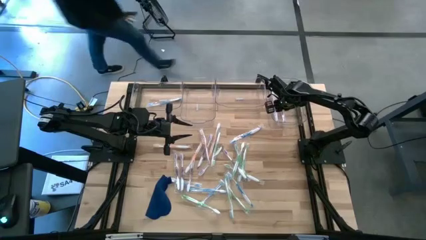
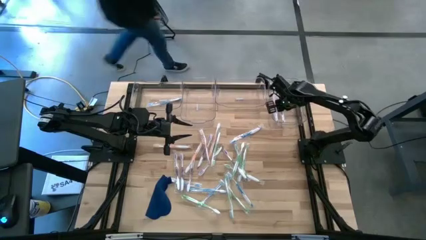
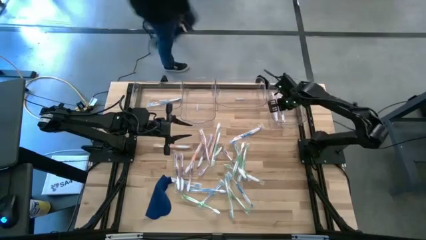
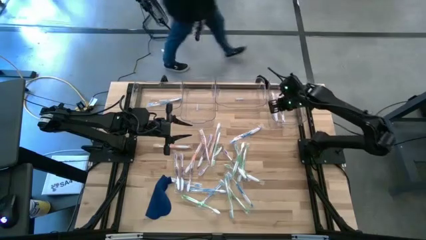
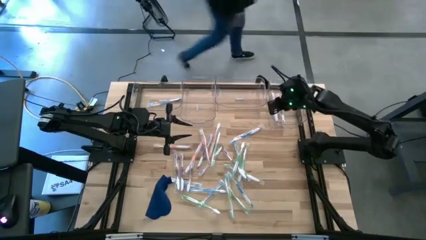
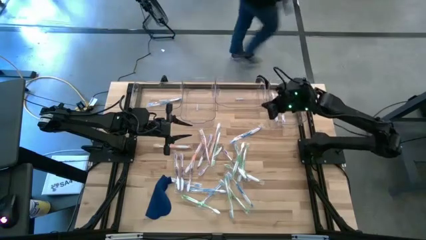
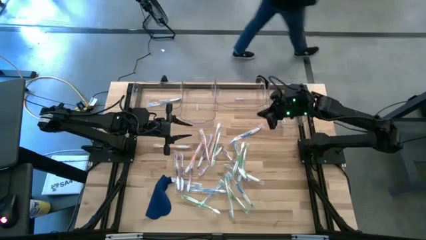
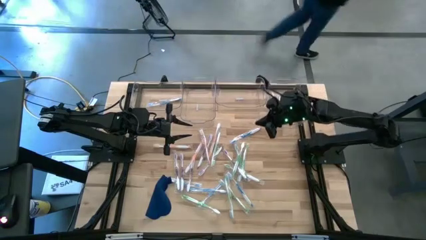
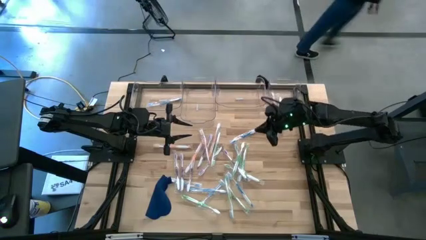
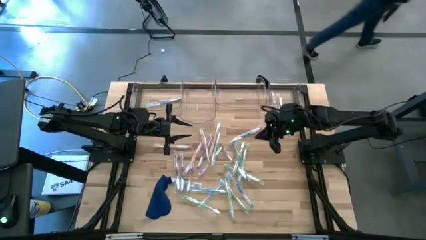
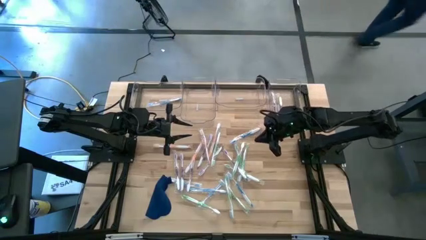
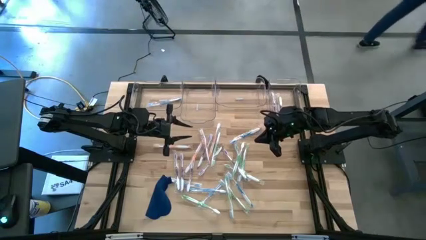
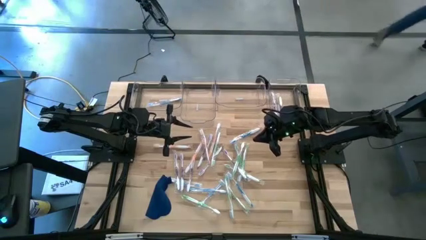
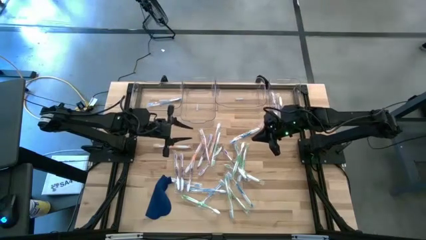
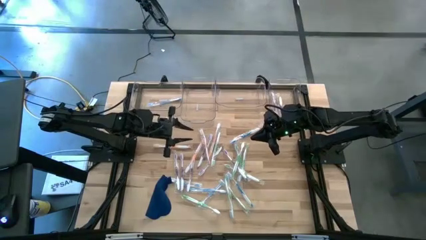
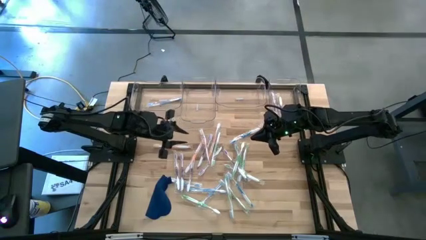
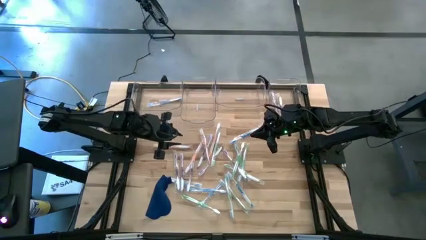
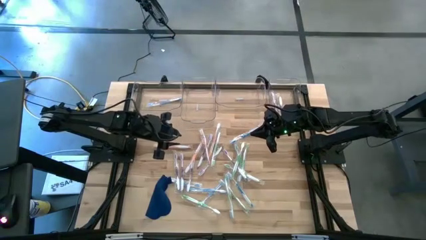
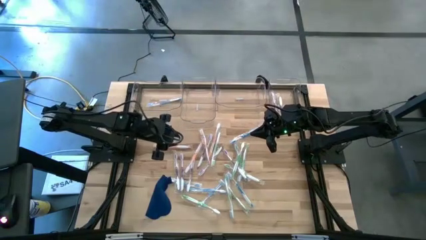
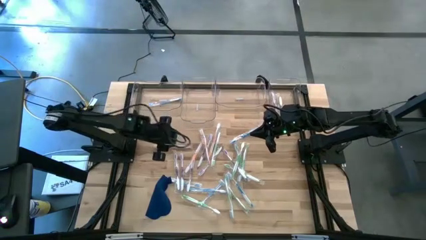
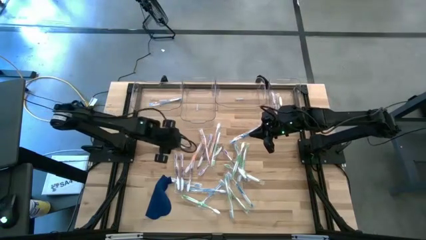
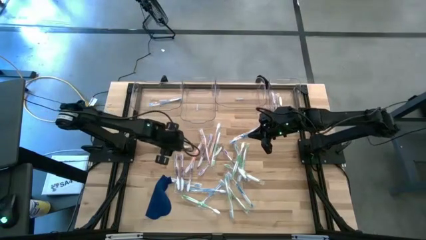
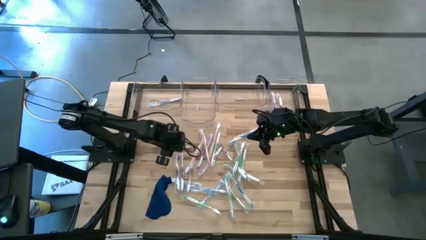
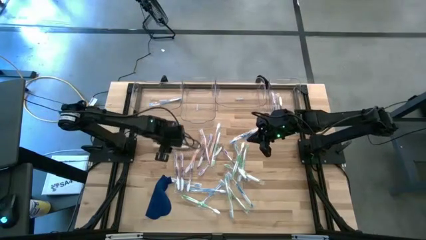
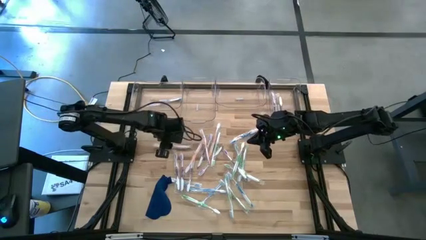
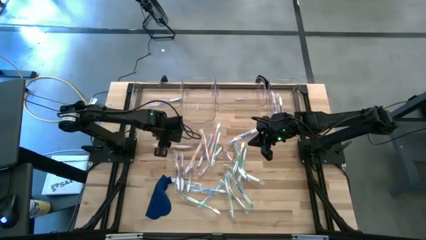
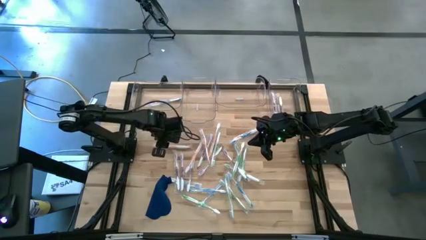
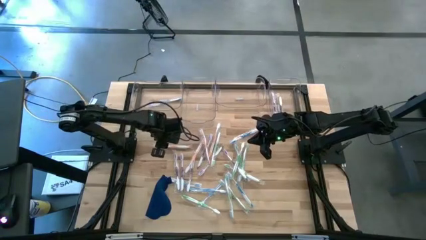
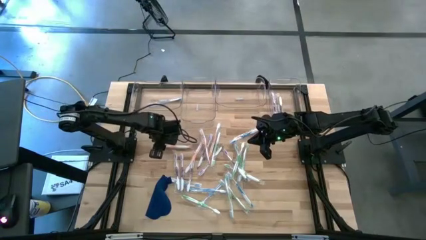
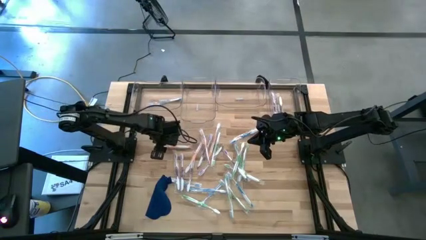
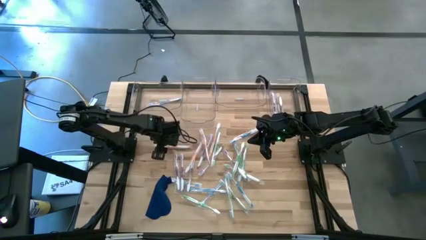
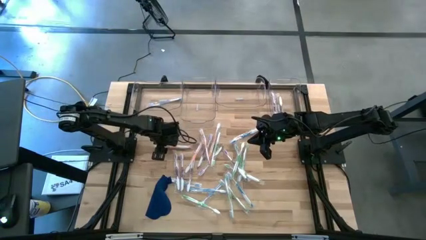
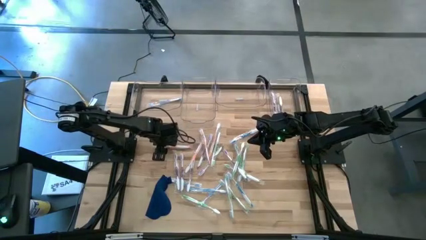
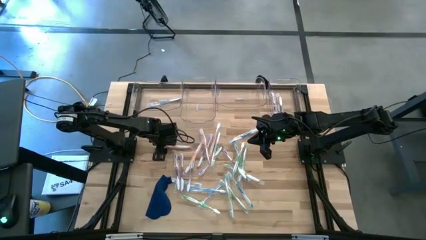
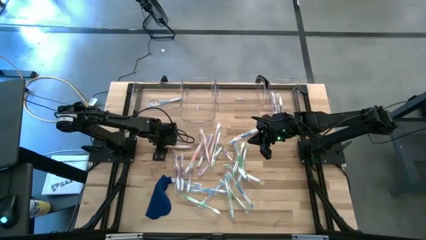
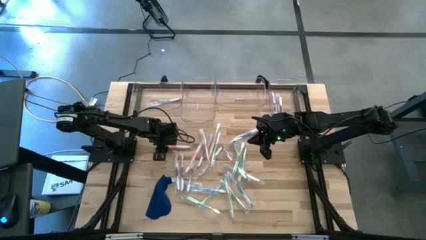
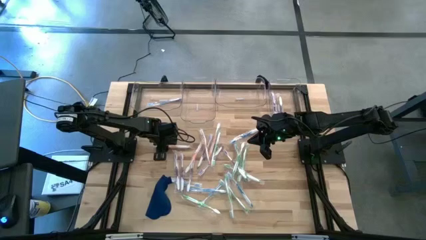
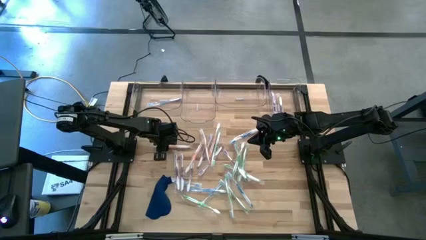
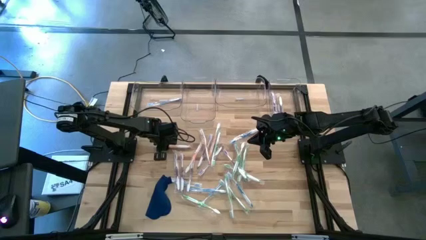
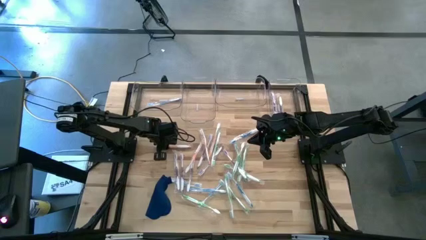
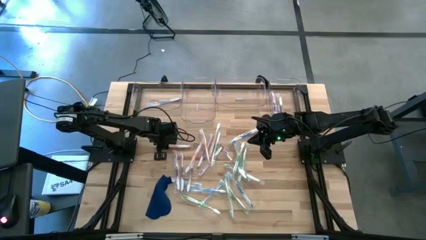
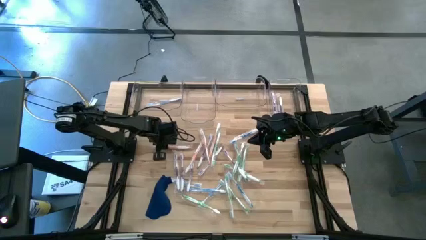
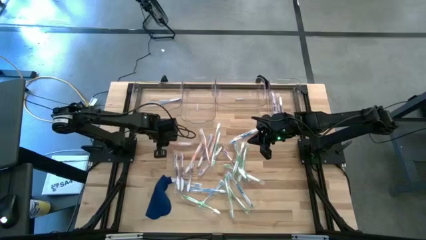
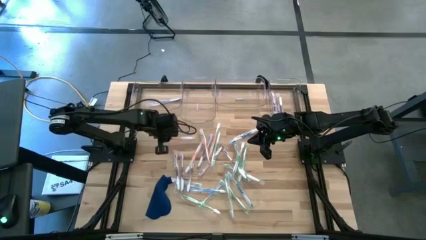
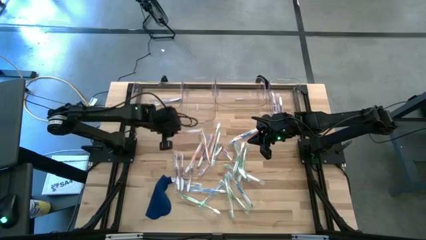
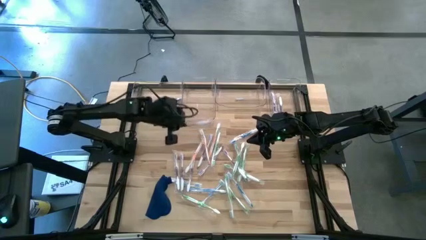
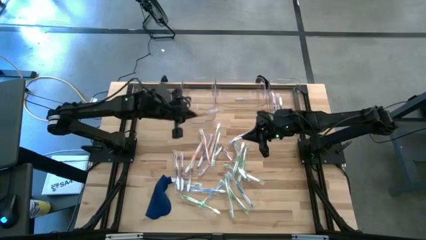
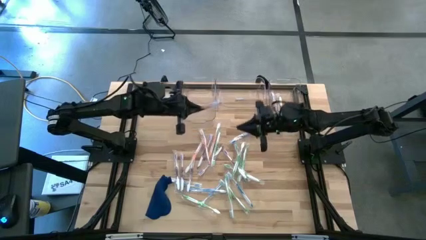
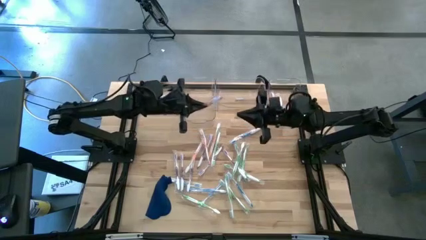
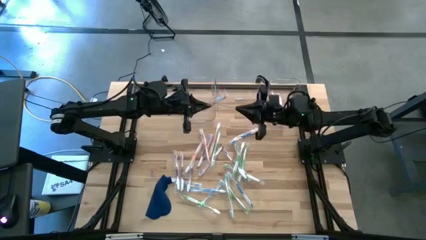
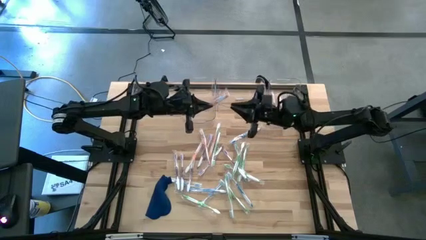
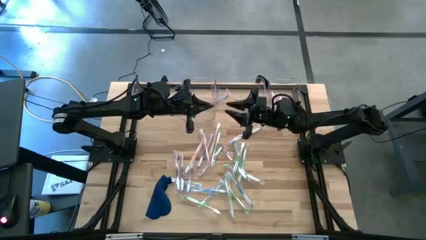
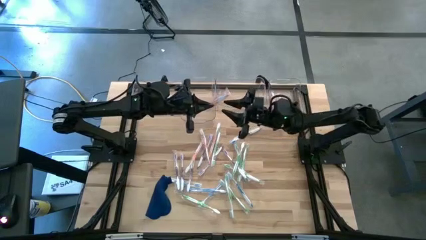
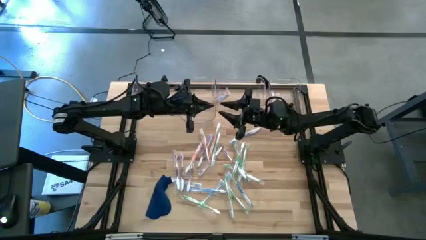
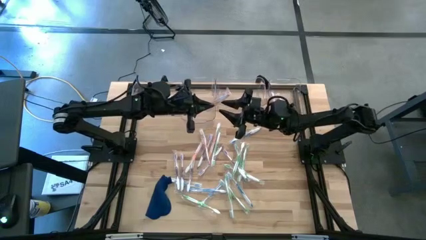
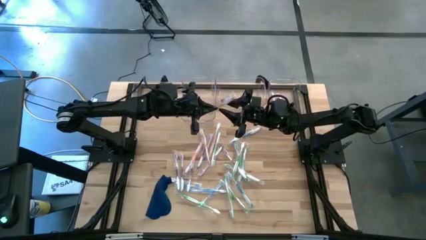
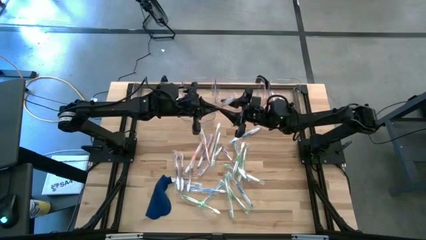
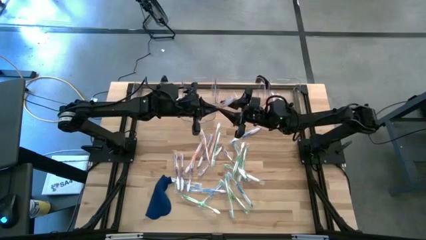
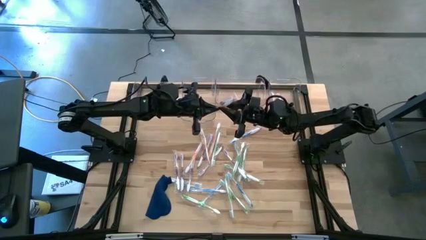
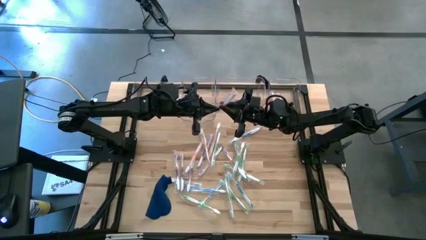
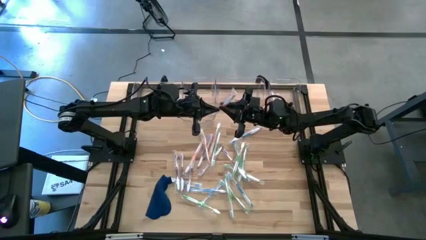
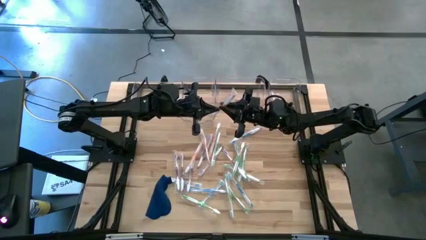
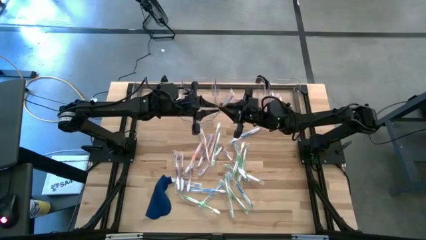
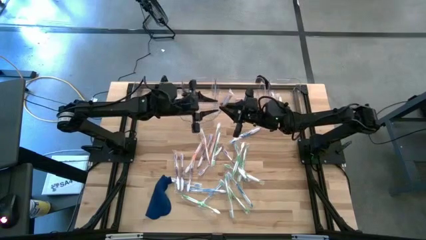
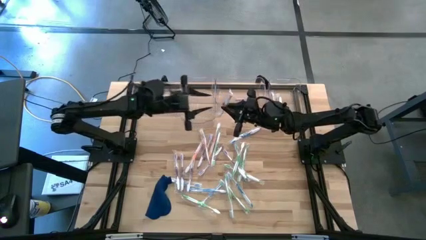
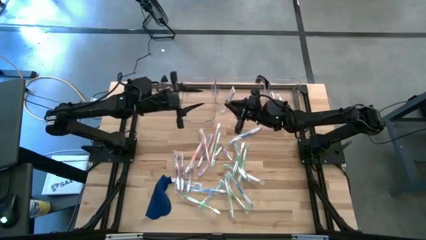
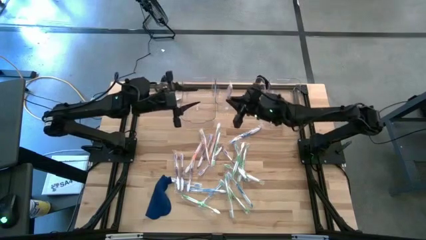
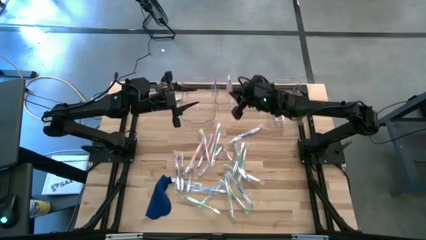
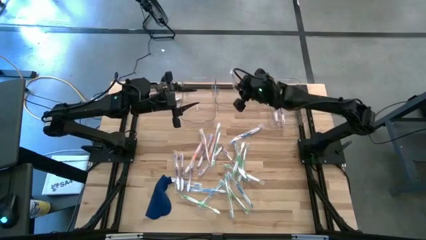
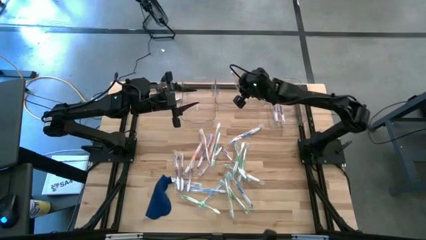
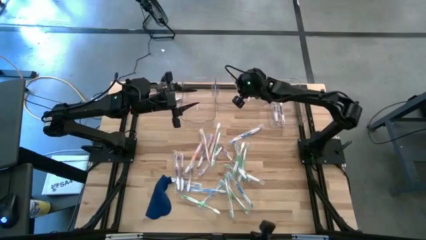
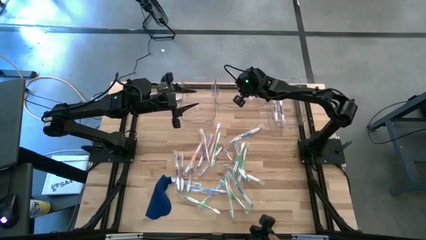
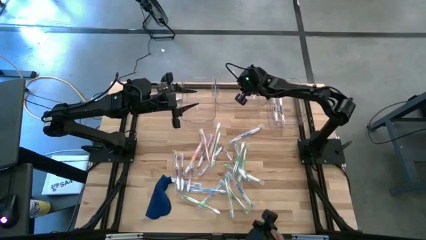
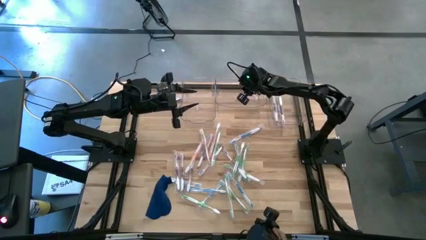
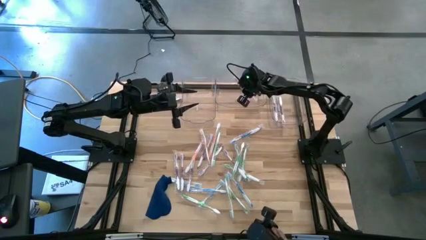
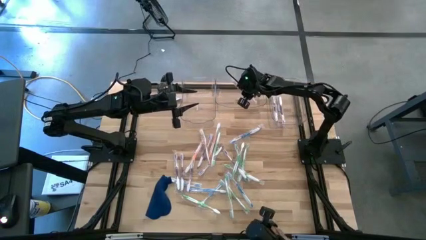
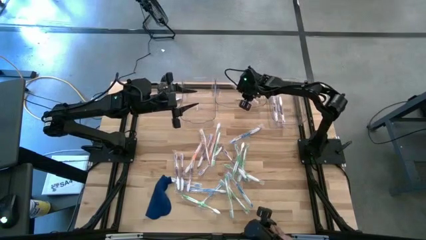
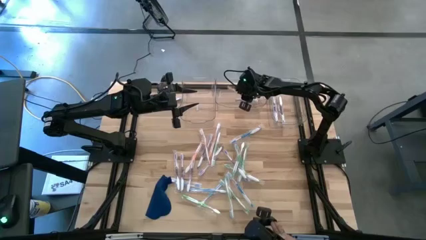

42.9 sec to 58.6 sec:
Task: Pick & Place Toothbrushes
Put the orange toothbrush into the middle right transparent bin

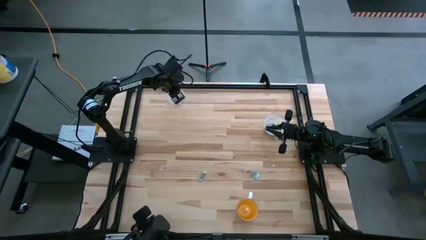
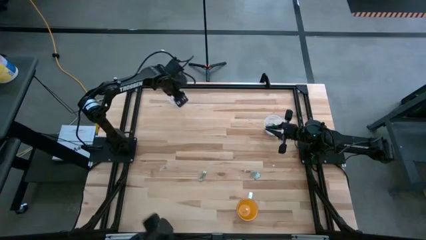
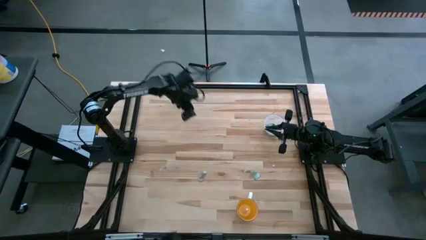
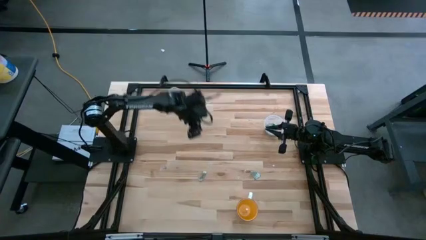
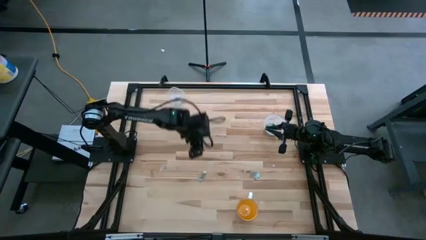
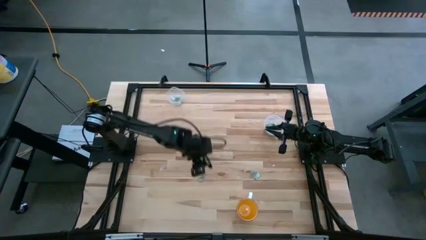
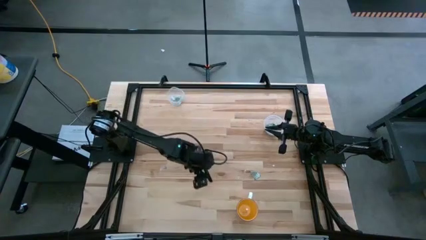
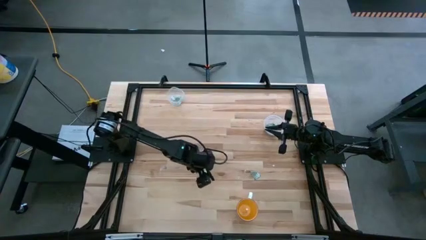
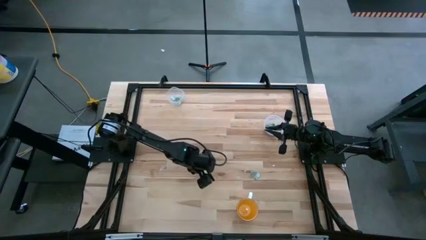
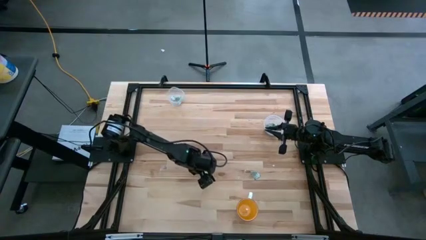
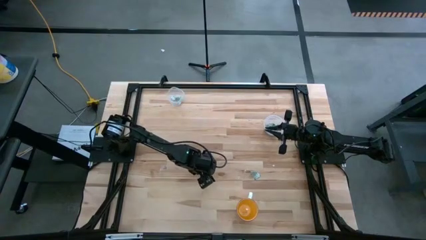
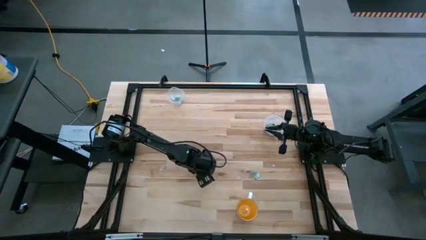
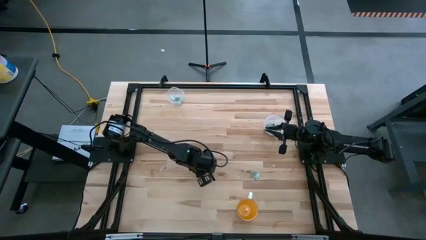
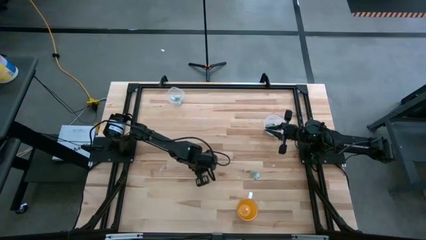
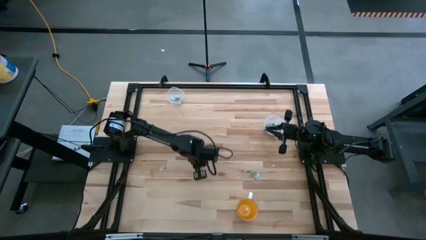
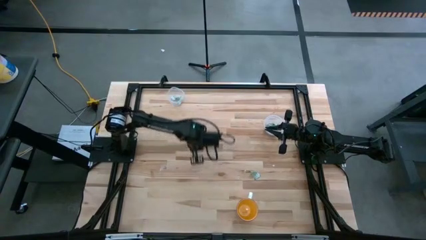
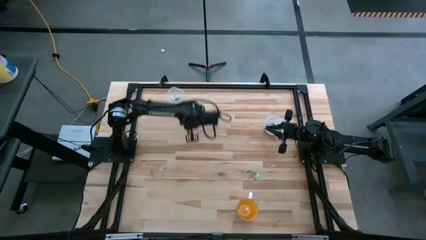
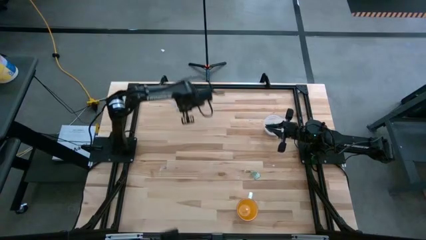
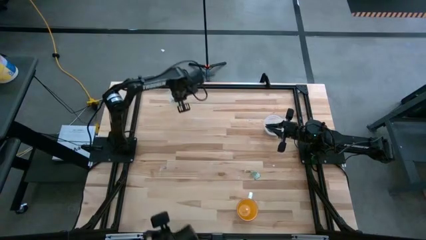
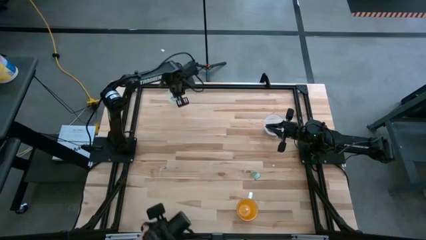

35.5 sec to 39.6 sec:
Task: Pick and place items into bin
Put the stevia packet into the top transparent bin
